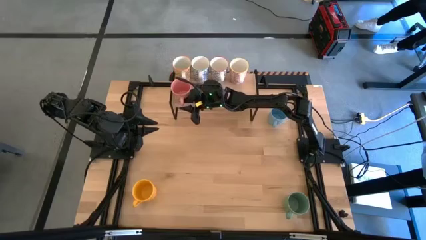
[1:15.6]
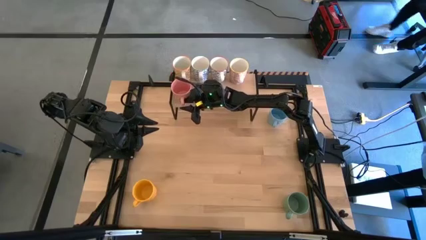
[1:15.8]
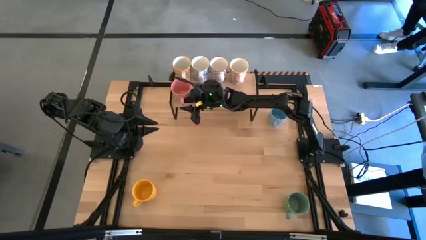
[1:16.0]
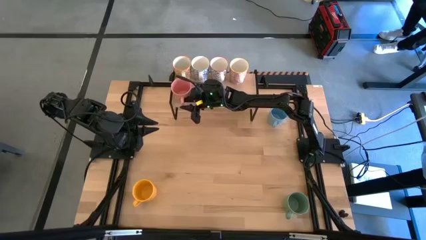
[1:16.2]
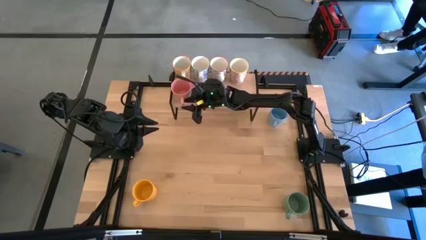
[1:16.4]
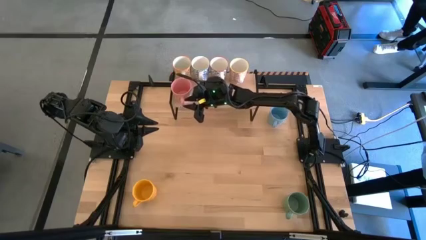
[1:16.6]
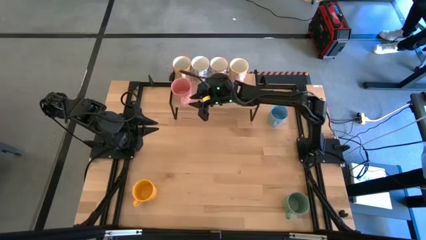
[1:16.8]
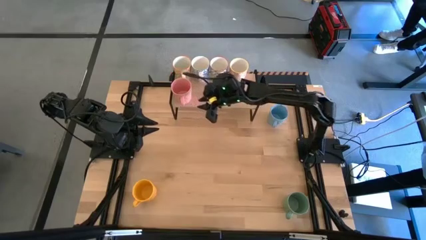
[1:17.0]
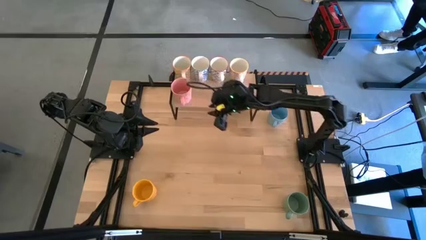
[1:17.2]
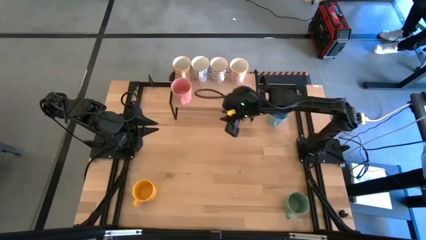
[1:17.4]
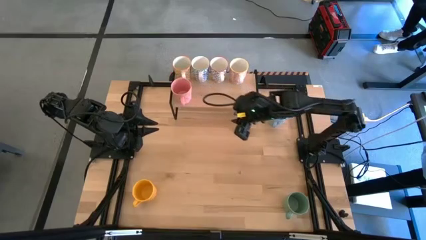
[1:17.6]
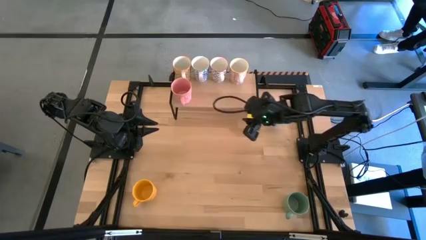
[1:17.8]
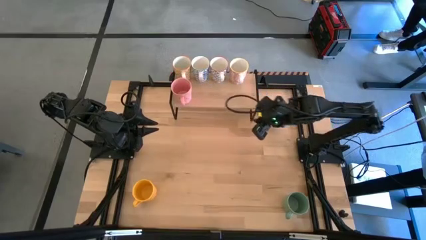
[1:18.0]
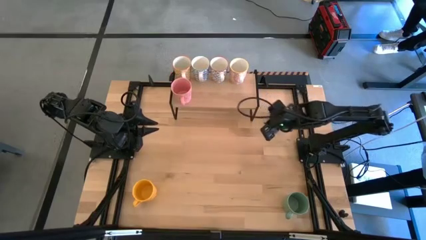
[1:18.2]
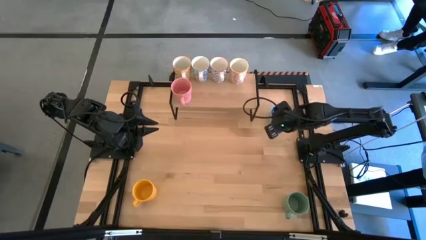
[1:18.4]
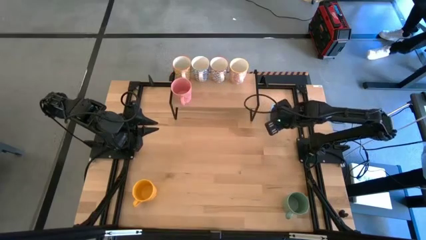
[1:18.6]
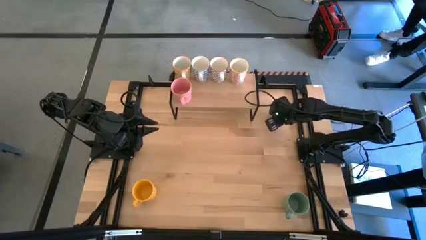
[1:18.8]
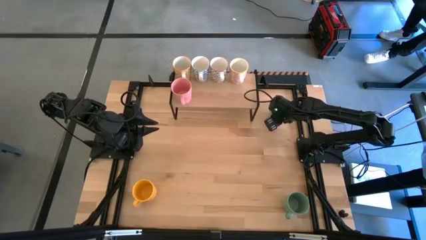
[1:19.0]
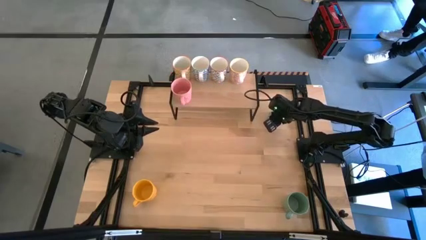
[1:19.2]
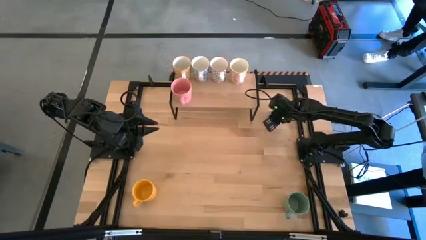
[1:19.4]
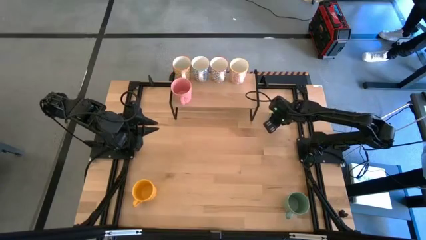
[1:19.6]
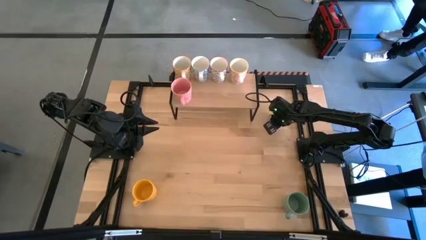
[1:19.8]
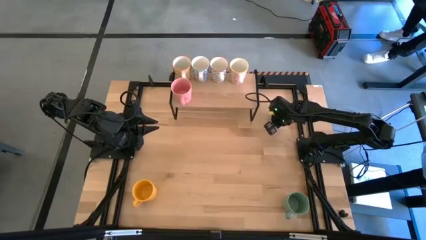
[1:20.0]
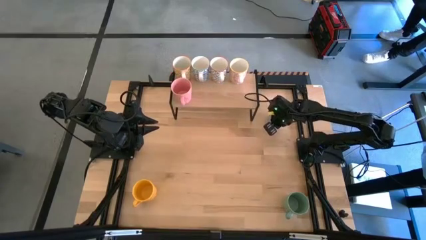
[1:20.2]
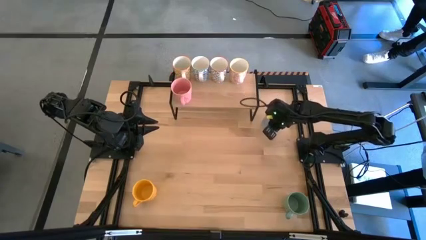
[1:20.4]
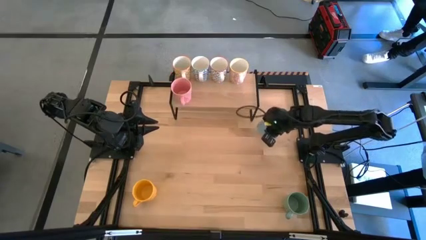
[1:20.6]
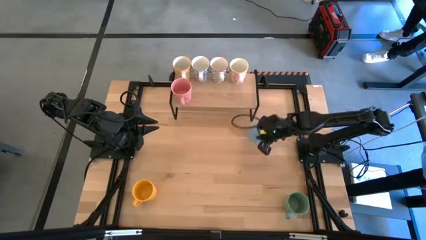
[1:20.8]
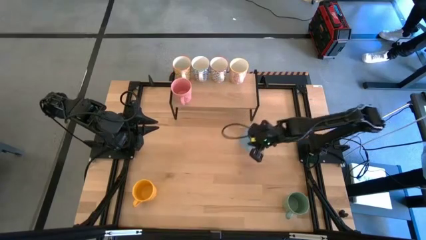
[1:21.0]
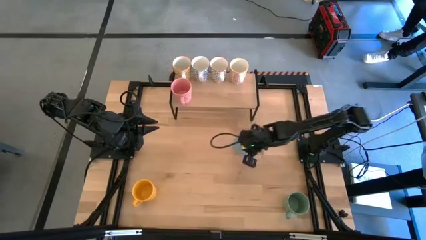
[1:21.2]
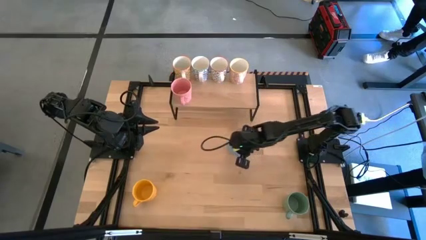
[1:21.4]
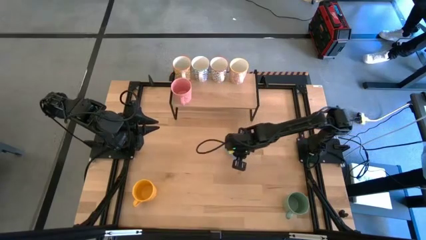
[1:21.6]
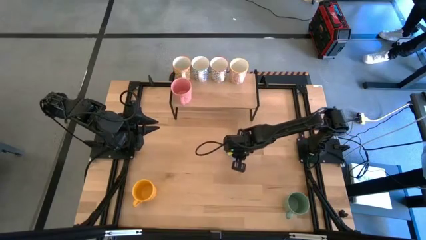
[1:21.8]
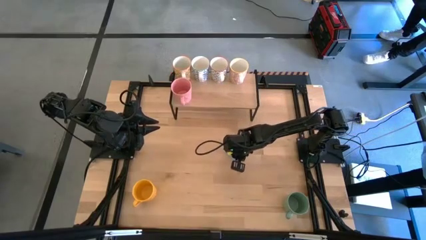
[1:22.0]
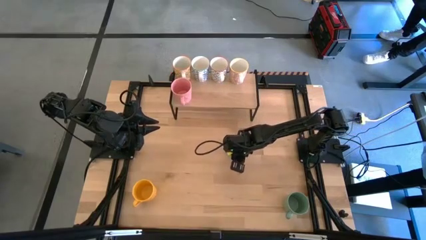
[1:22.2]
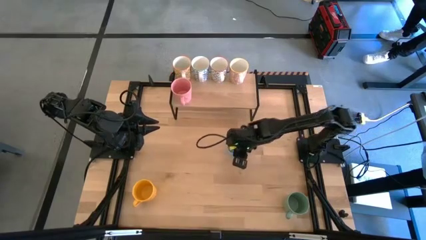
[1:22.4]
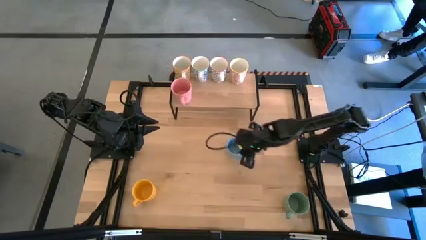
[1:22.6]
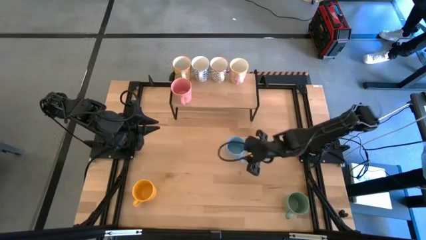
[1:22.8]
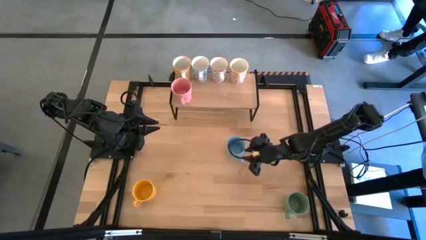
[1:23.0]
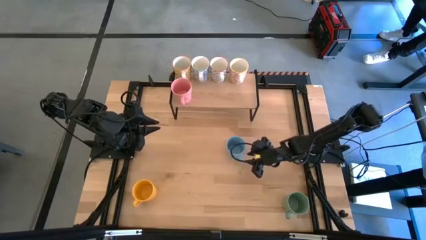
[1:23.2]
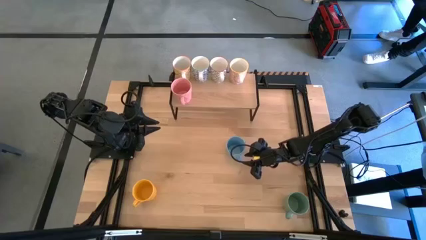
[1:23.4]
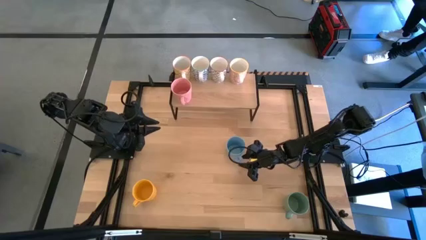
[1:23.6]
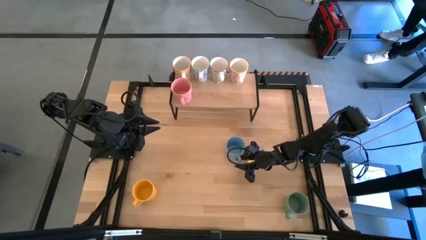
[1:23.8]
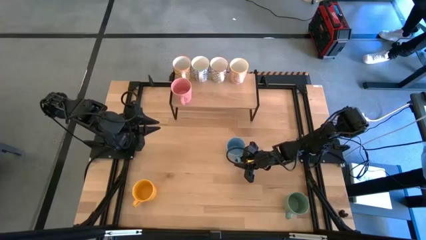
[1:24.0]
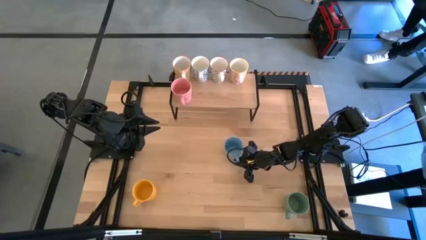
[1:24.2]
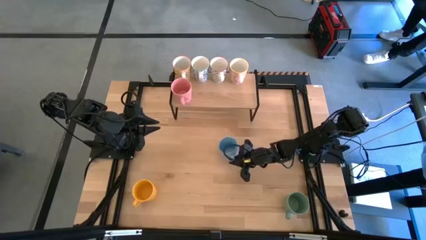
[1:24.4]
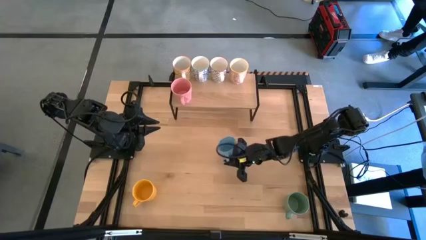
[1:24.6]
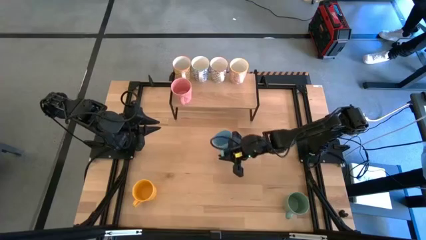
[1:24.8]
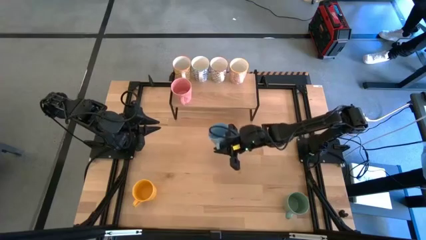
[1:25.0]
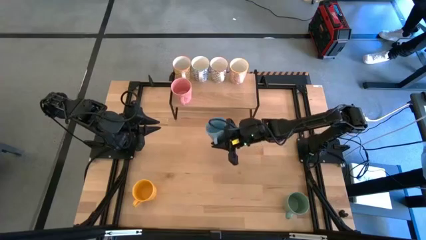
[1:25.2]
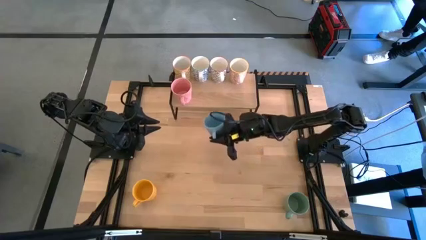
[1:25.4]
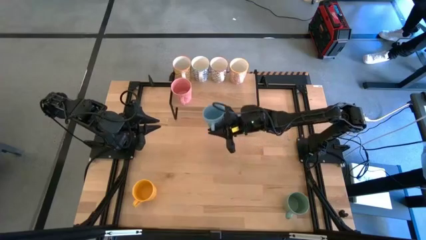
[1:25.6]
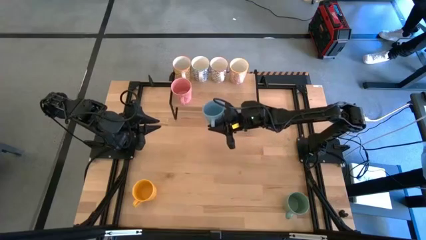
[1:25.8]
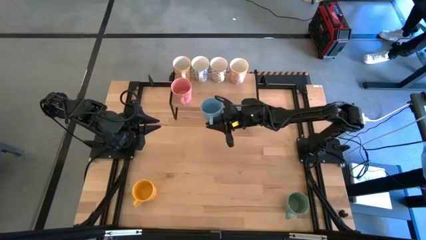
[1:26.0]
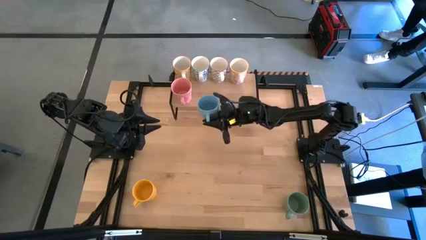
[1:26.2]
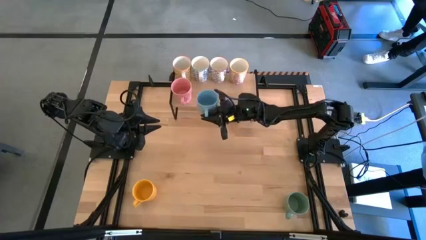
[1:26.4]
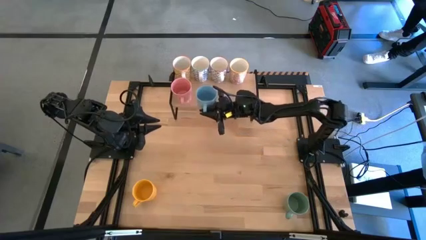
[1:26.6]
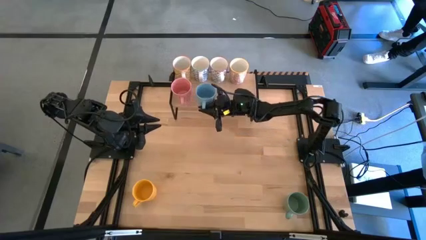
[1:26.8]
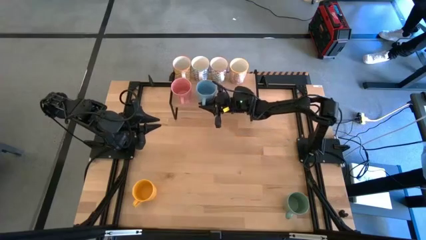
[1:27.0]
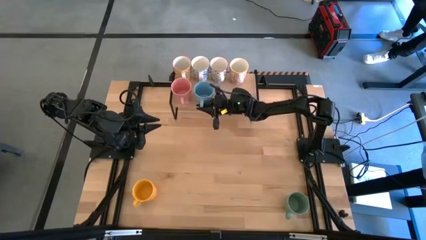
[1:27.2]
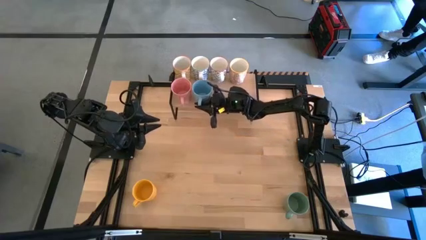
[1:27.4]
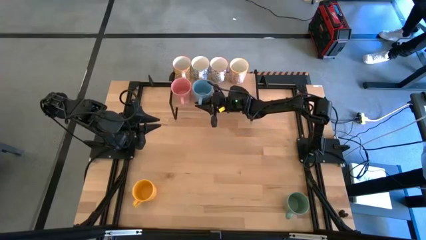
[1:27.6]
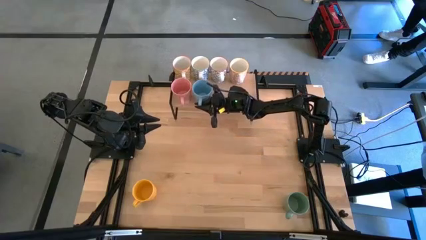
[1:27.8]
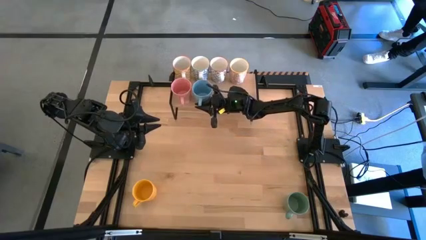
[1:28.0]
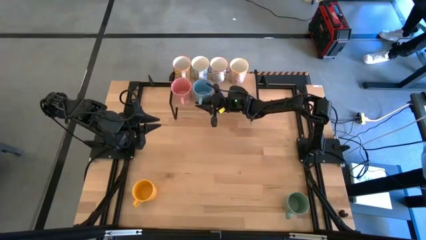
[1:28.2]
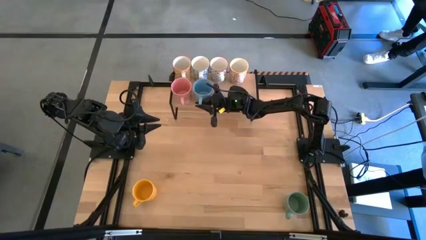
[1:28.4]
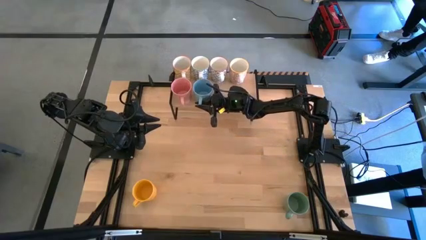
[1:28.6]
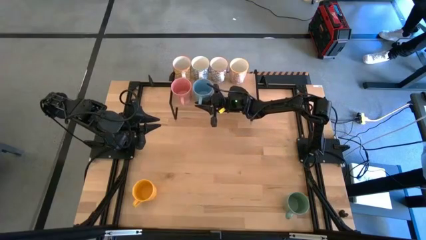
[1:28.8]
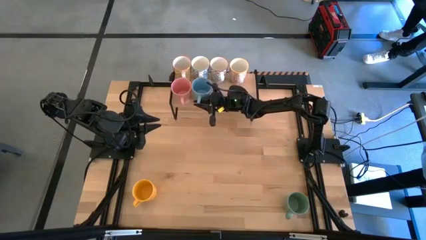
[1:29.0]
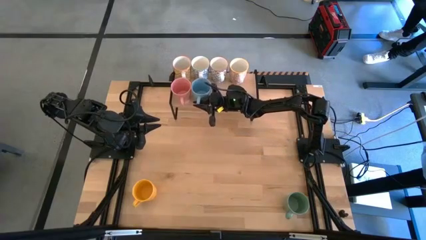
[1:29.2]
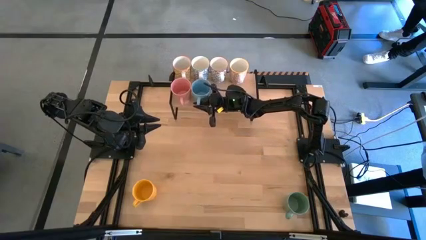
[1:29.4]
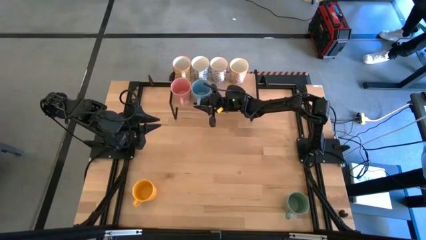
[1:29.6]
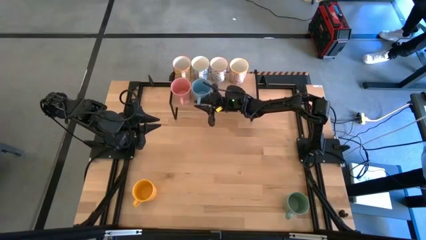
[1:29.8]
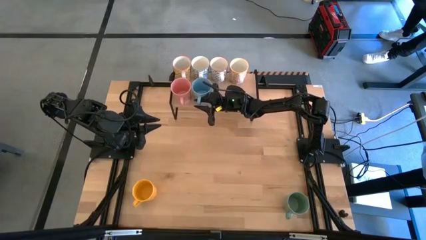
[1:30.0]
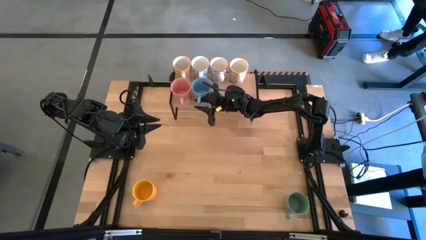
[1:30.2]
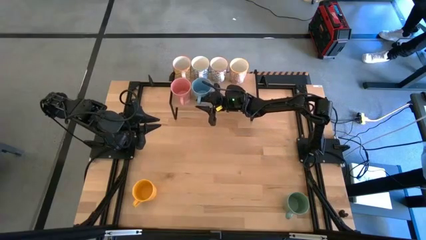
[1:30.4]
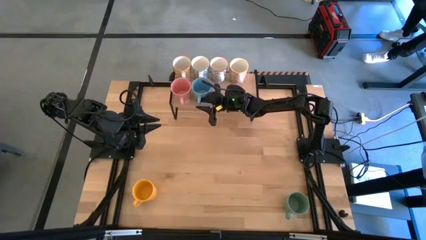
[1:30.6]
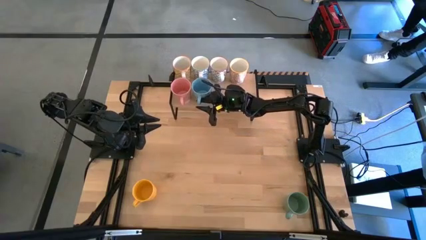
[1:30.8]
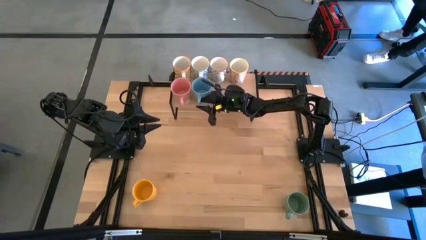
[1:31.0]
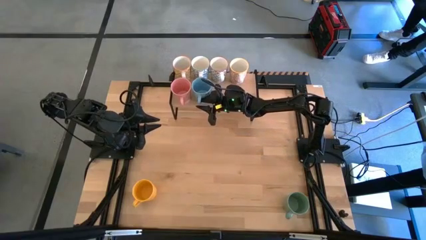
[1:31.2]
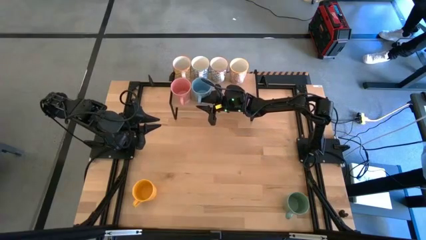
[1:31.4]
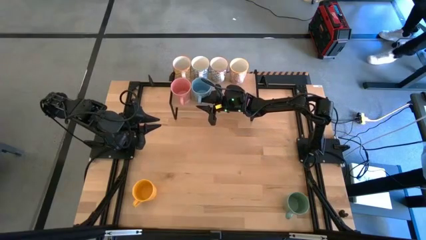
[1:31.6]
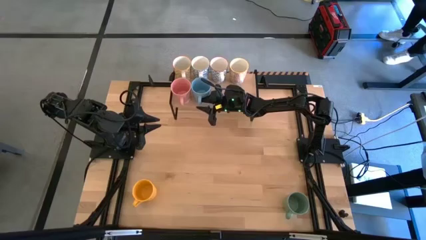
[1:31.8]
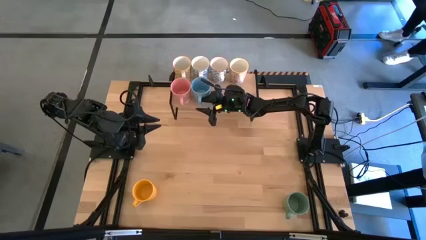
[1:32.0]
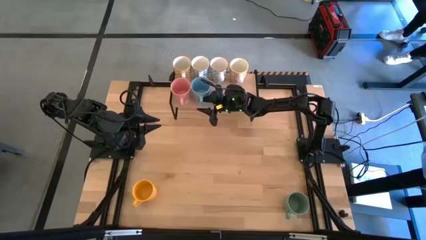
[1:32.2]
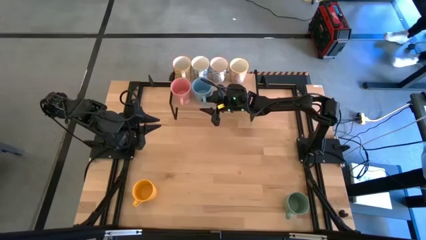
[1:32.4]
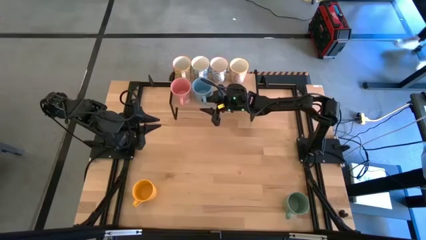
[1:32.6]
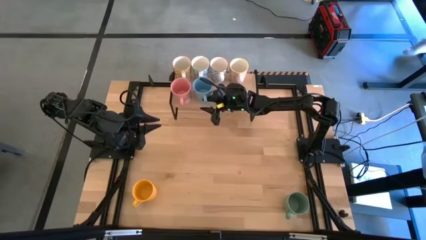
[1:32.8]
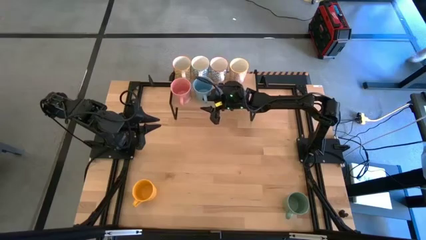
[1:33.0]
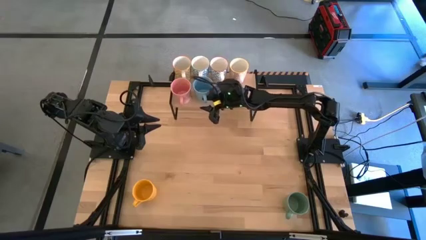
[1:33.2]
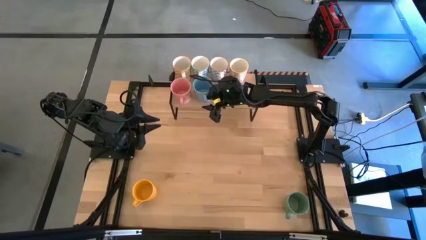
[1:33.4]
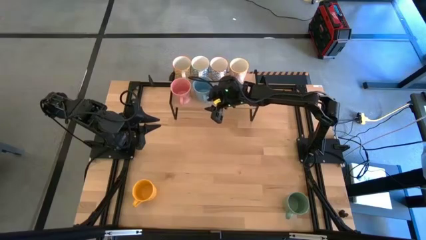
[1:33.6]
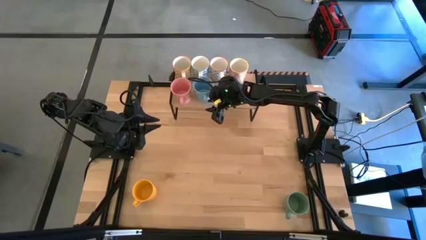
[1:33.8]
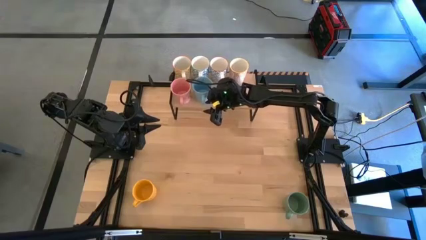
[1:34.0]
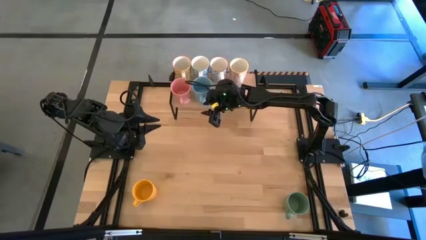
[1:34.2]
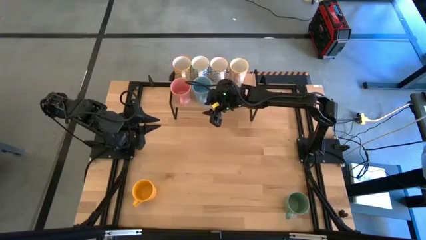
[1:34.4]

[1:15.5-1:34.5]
Task: Place coffee mugs
Put the blue mug on the shelf
